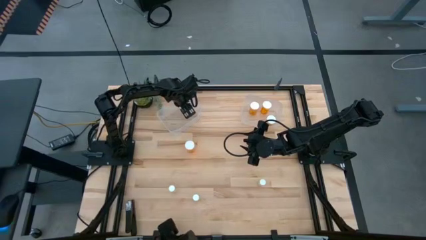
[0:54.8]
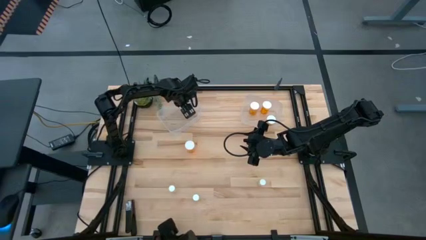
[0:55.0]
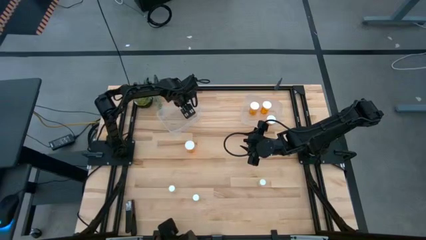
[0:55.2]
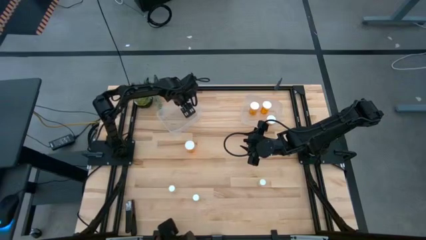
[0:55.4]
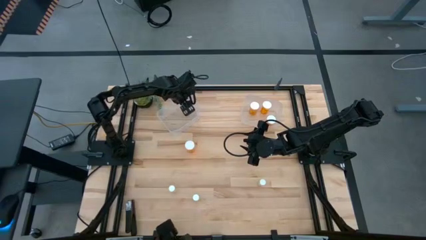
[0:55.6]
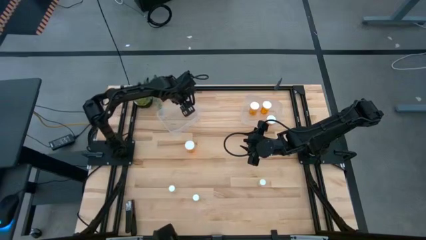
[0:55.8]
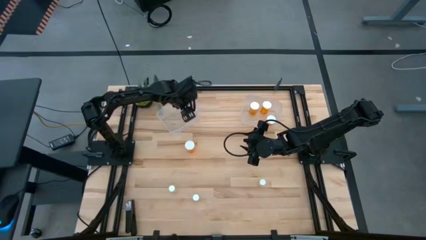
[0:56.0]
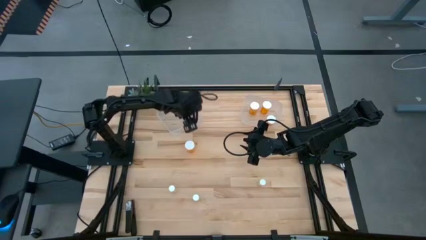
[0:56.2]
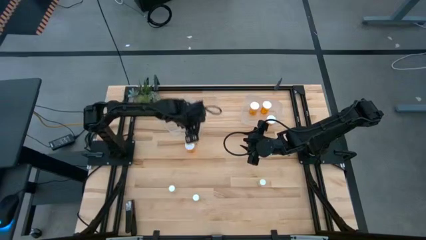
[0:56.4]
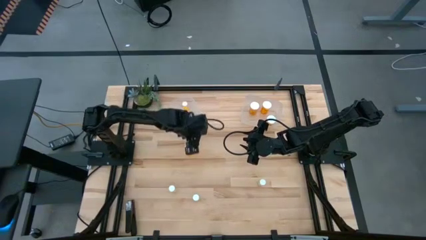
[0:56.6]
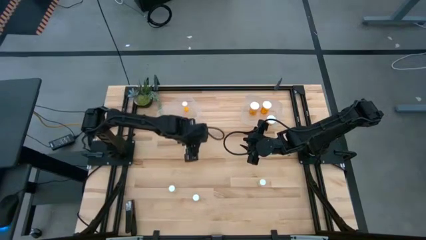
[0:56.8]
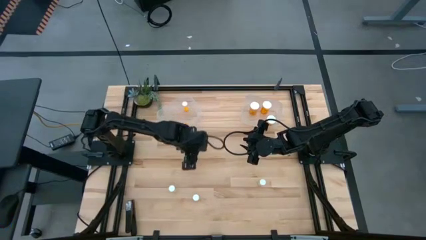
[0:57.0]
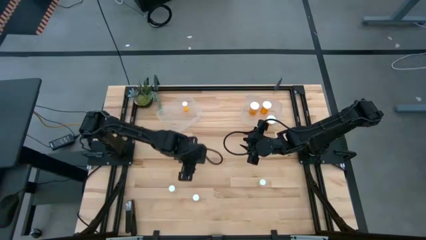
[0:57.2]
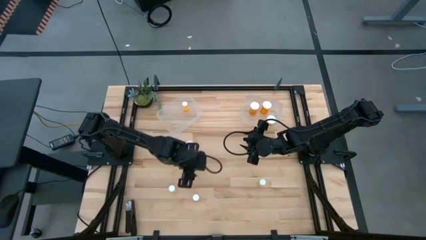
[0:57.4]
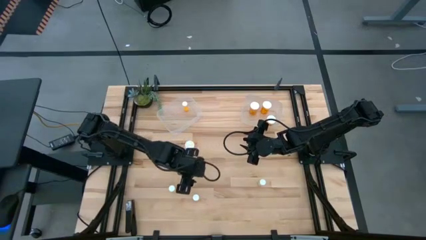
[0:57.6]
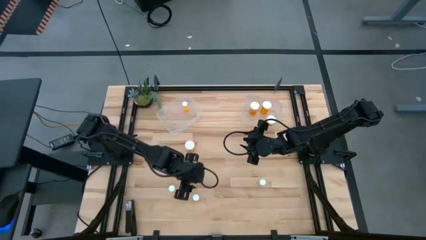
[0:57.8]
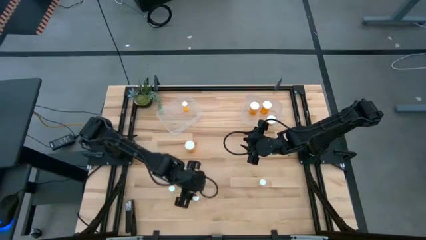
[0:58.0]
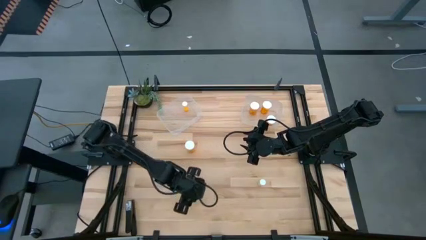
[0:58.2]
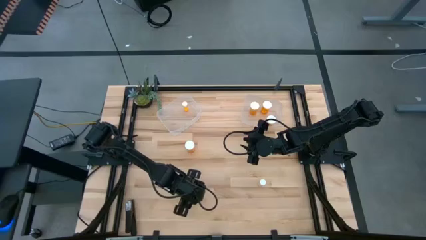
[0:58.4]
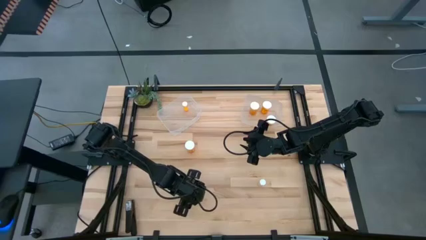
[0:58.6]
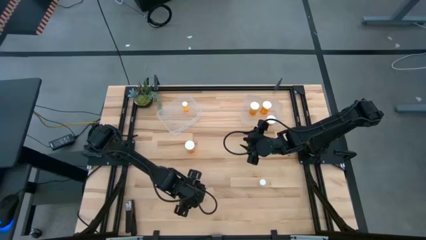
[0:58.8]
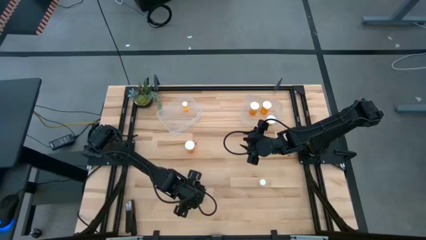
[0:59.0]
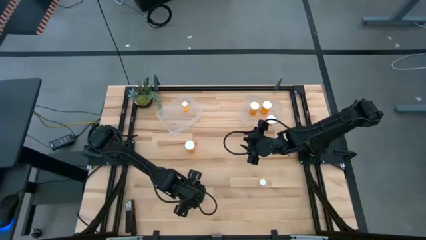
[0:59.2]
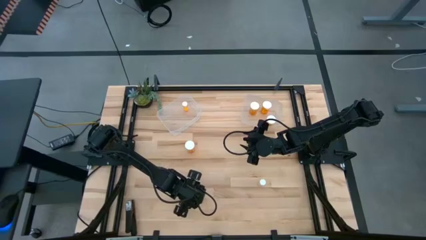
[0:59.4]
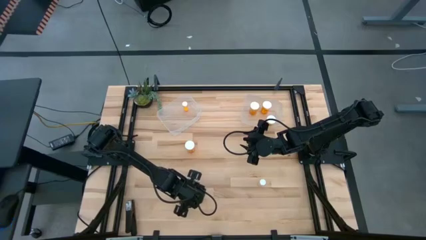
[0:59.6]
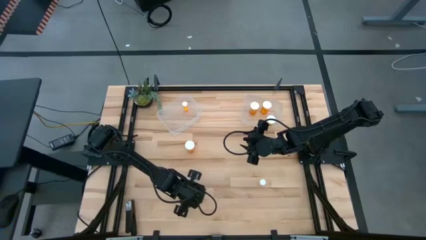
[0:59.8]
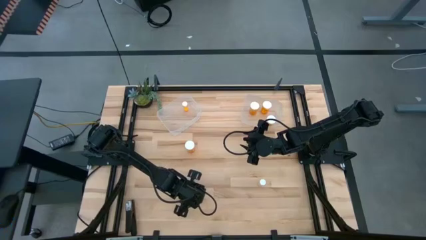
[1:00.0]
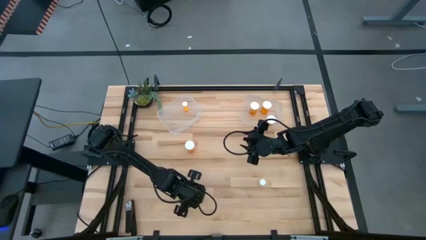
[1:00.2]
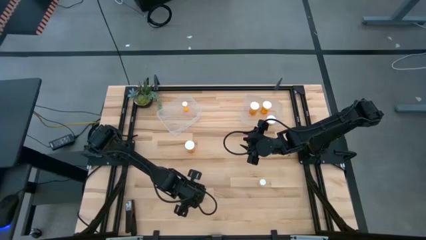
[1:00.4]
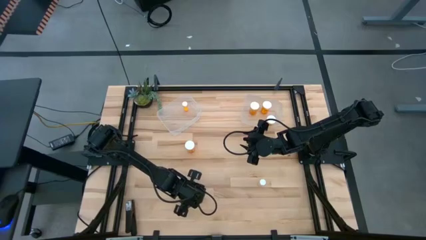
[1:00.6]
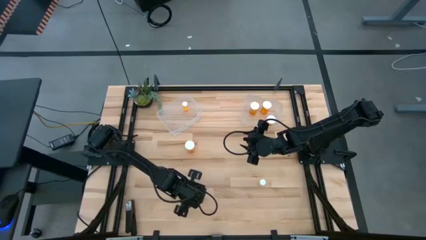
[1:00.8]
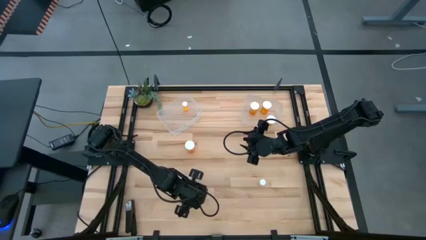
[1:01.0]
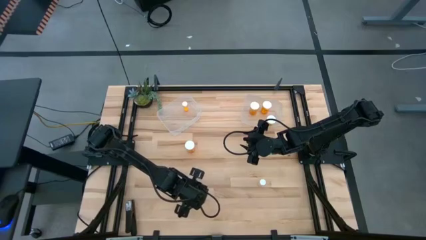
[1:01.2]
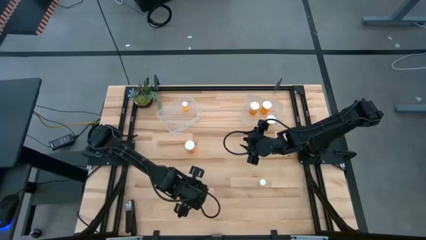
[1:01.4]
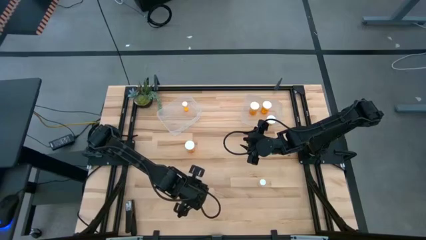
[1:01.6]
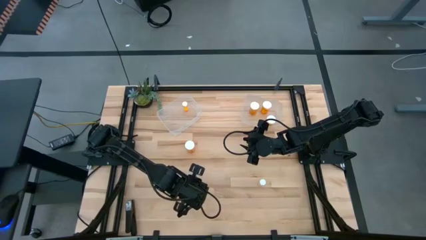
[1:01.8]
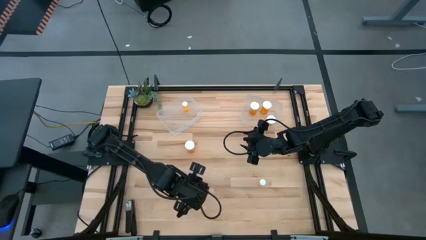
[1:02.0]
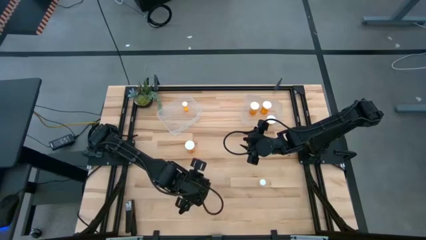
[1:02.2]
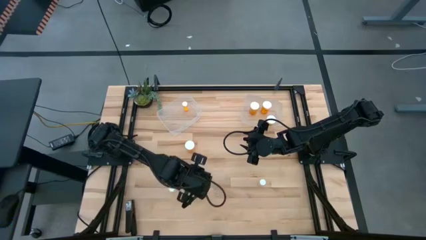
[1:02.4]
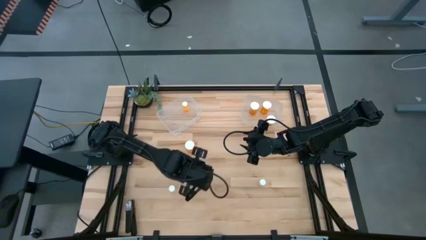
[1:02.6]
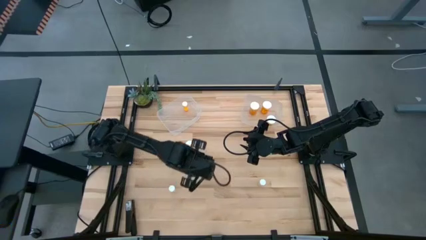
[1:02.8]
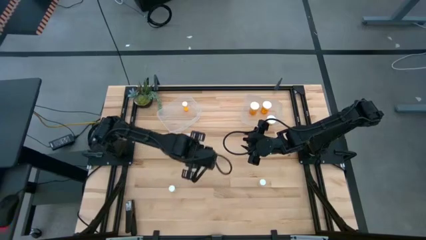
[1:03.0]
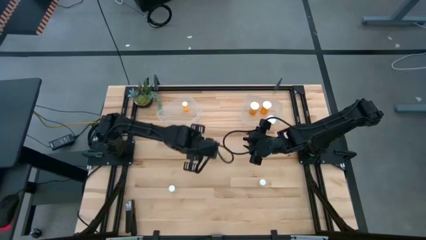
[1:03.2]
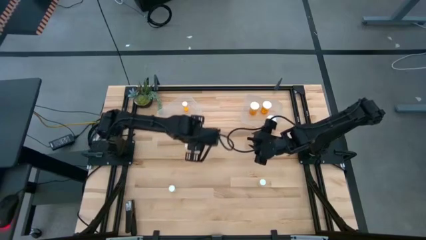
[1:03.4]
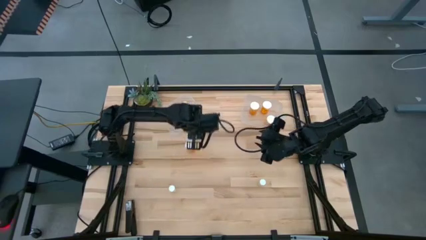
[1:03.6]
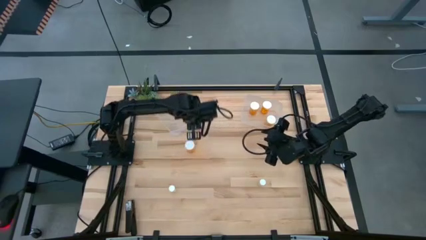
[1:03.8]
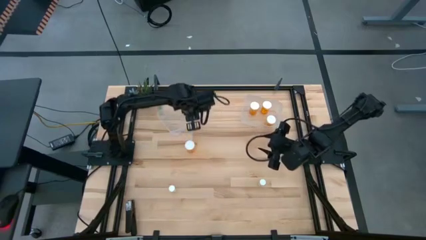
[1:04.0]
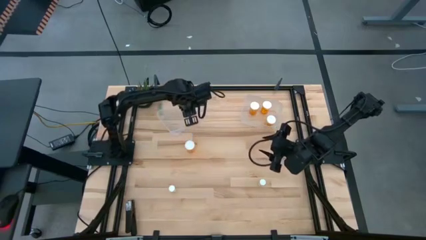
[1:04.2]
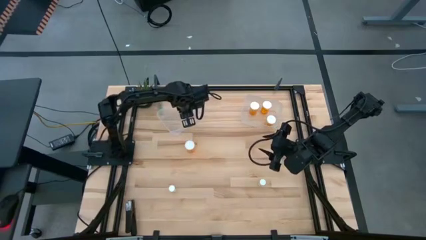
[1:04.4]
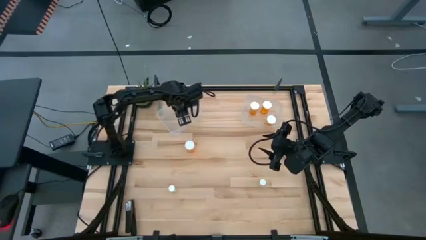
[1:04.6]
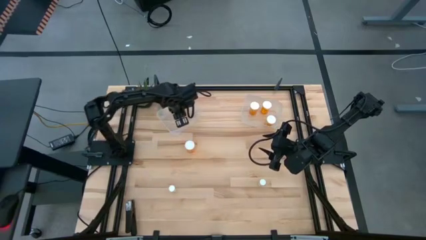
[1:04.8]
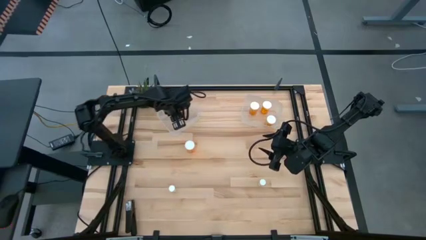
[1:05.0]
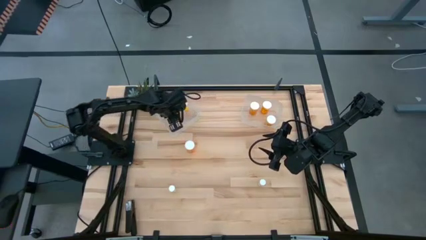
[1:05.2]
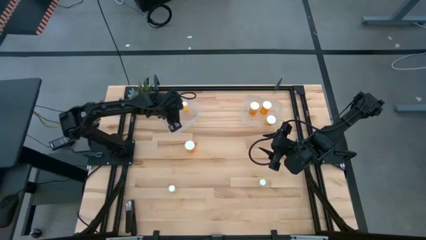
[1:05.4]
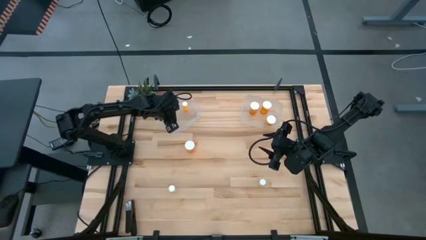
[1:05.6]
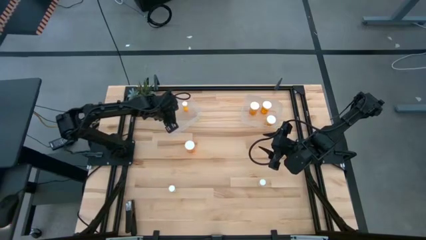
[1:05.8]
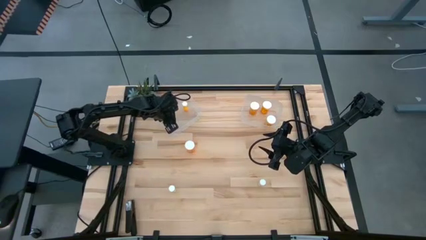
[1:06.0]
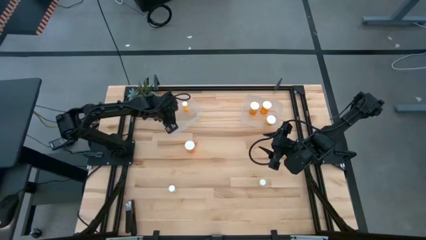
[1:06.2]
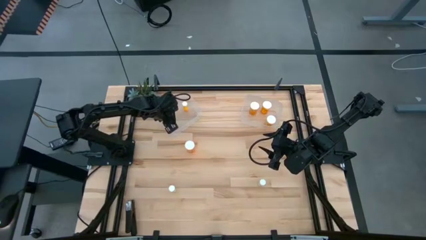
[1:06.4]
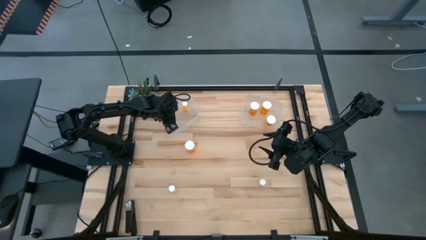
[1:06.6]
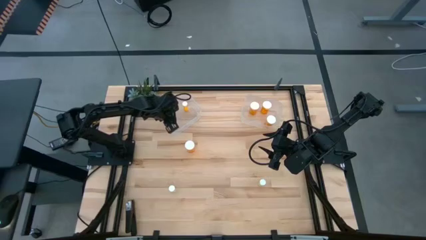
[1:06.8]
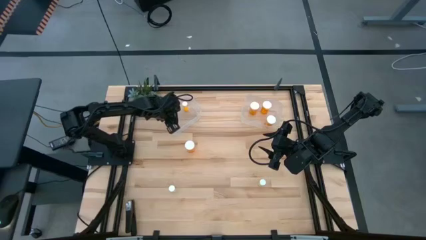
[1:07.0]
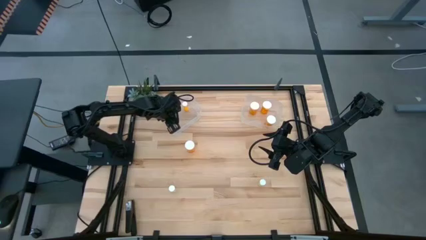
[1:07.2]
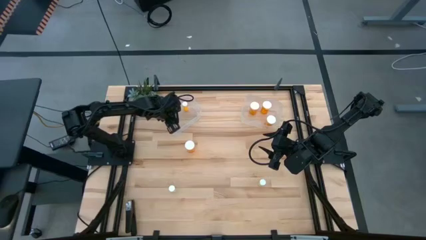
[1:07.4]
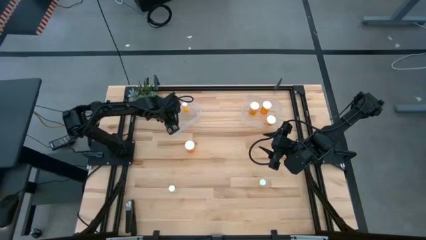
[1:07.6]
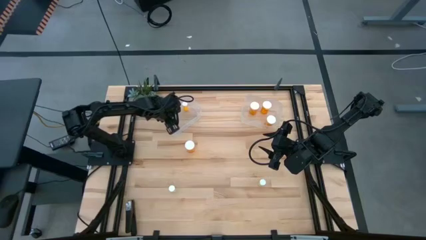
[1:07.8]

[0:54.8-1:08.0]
Task: Pick and place medicine bottles into bin by pill shape (circle, oval)
Put the small yellow pill bottle into the left transparent bin

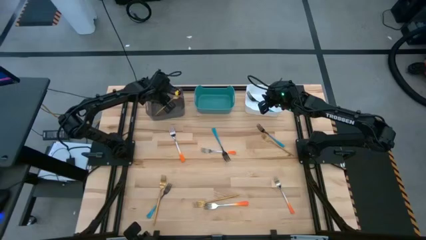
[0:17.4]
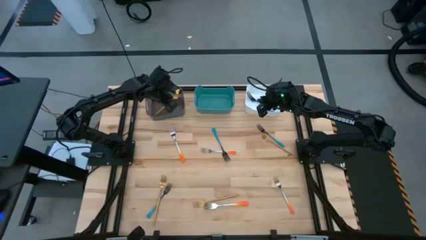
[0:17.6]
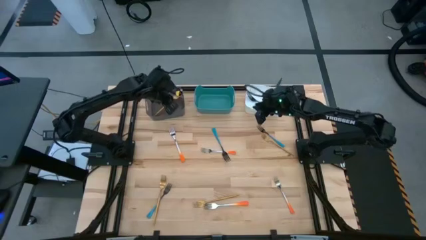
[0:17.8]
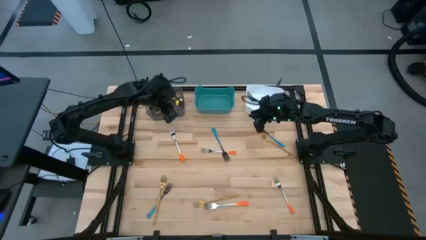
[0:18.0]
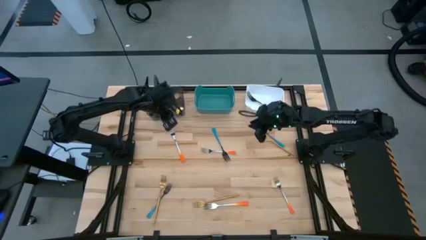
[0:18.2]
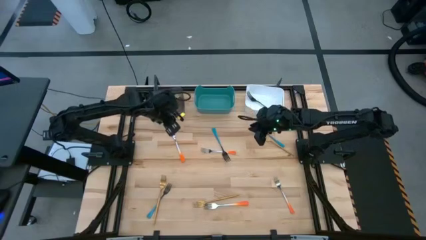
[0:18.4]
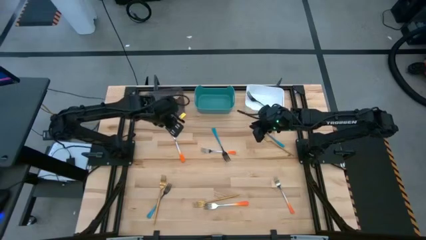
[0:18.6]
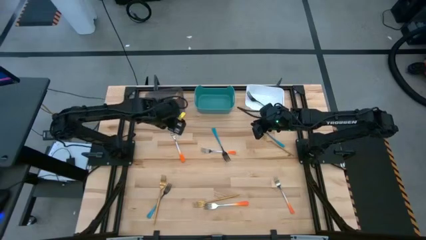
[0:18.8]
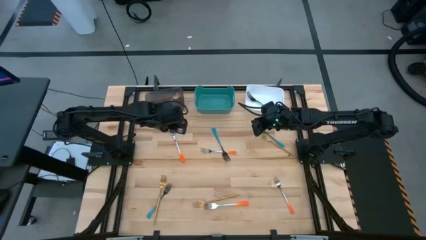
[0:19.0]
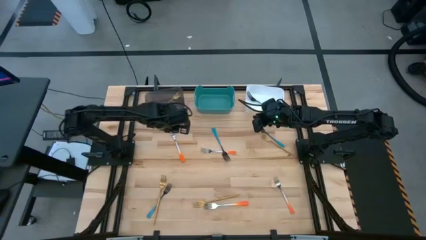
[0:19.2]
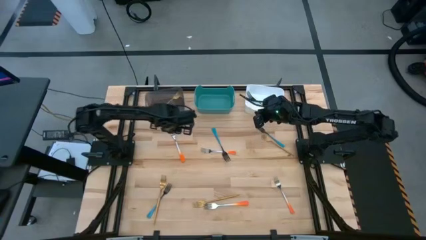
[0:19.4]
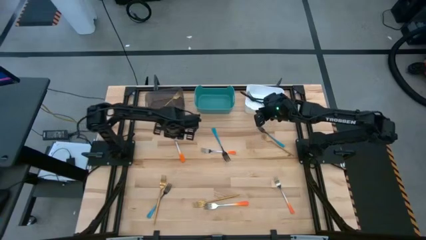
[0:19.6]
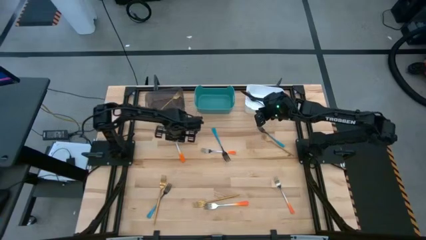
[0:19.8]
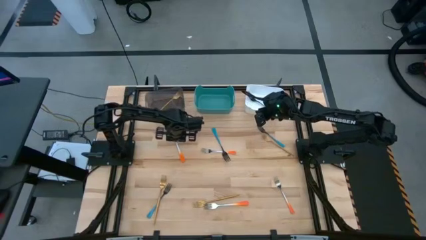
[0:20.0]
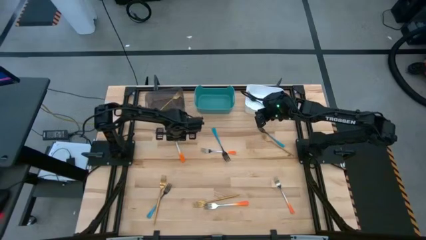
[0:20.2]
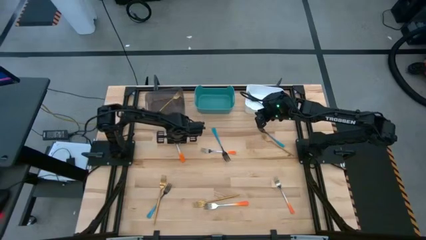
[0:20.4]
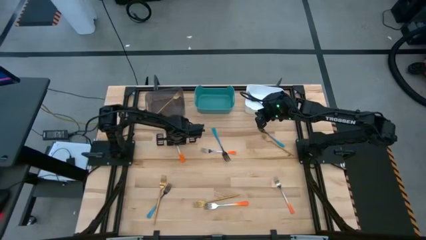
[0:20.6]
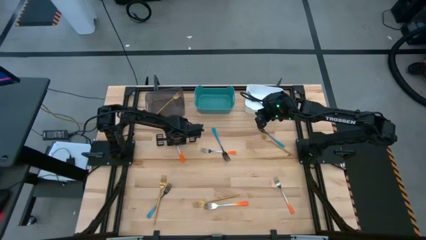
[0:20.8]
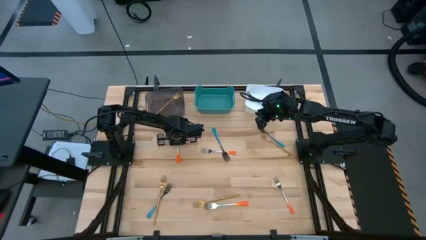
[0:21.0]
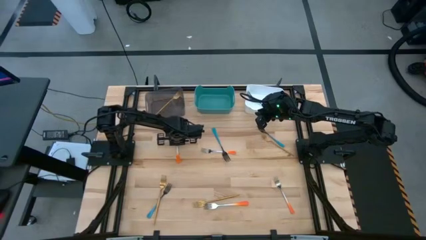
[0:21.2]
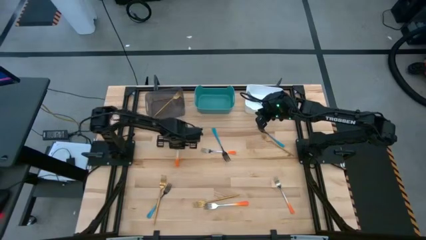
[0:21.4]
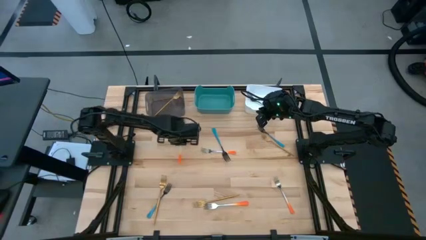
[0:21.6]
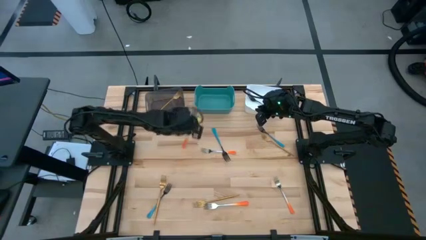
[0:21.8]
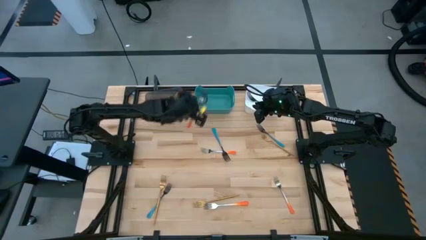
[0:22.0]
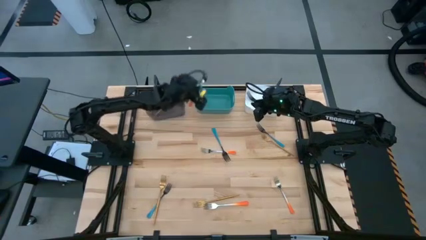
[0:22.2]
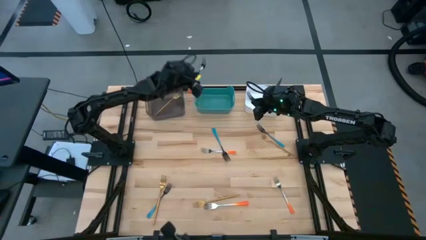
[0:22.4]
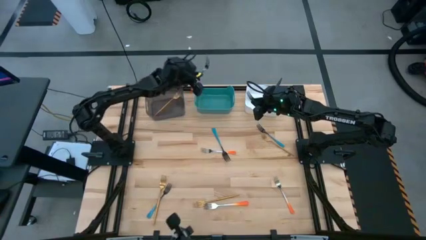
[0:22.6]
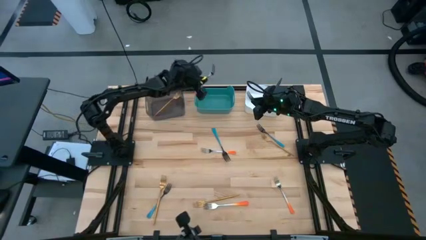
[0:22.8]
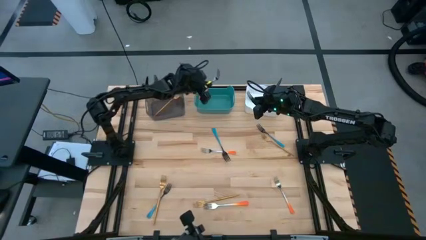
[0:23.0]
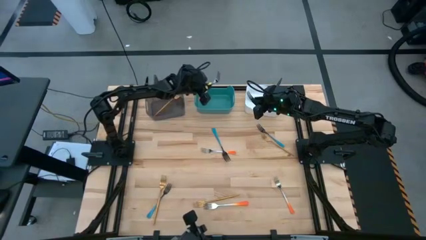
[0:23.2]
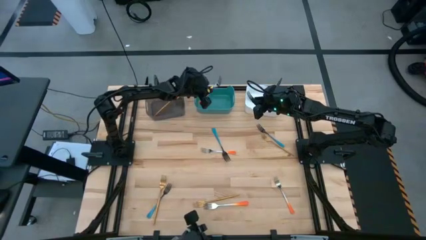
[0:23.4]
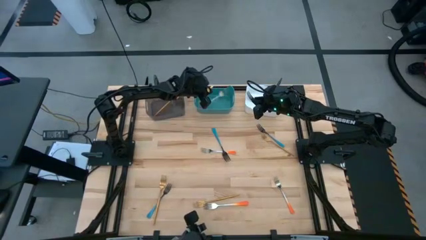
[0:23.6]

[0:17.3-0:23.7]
Task: Sort silverware by color (type)
Put the orange fork into the green bin
